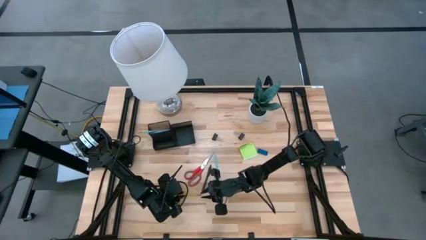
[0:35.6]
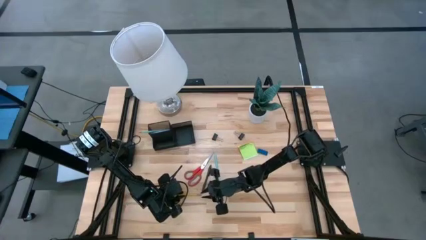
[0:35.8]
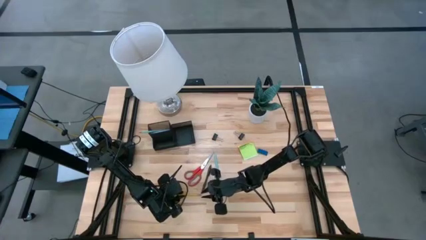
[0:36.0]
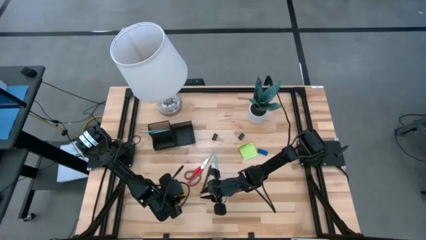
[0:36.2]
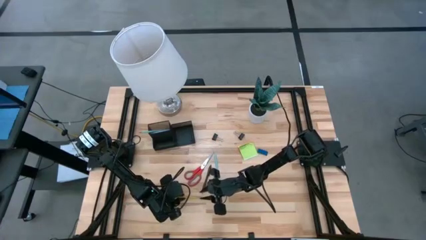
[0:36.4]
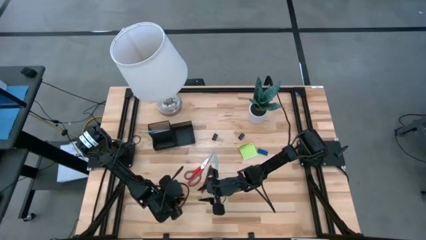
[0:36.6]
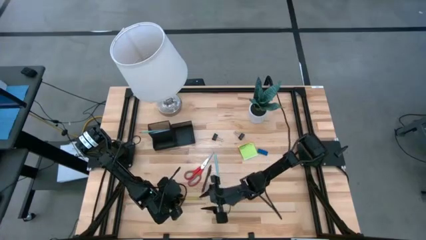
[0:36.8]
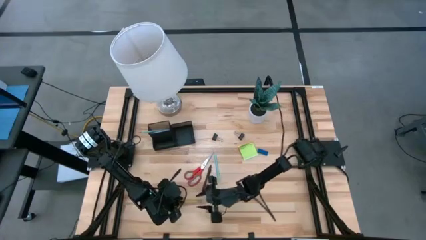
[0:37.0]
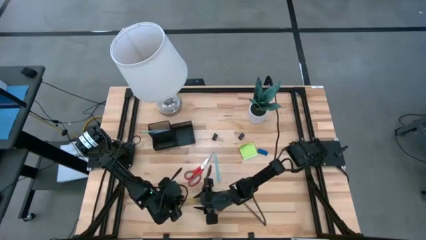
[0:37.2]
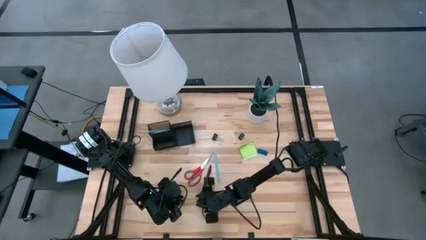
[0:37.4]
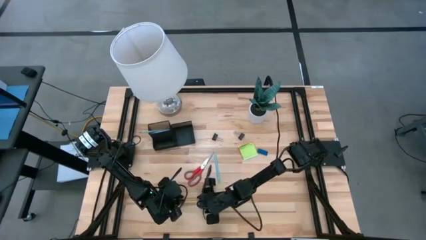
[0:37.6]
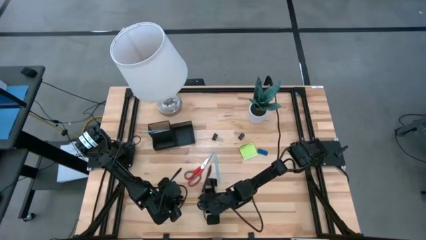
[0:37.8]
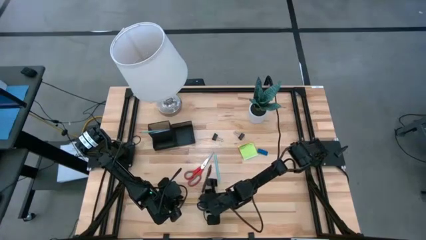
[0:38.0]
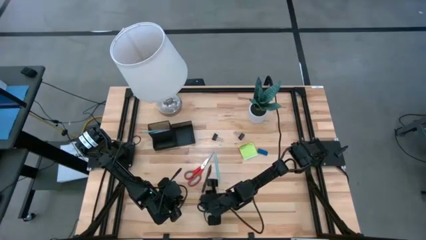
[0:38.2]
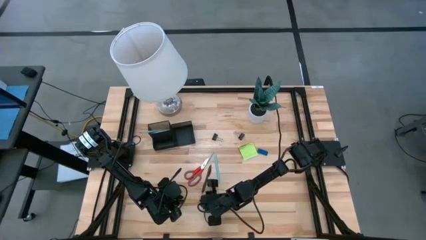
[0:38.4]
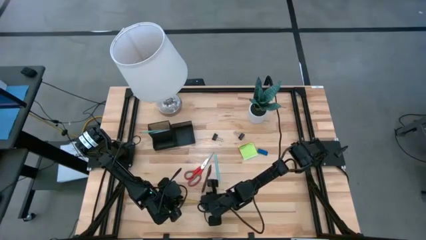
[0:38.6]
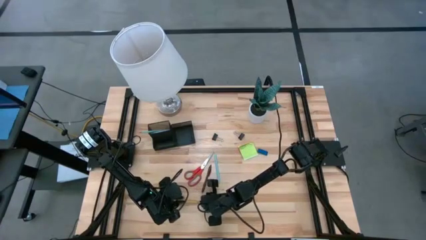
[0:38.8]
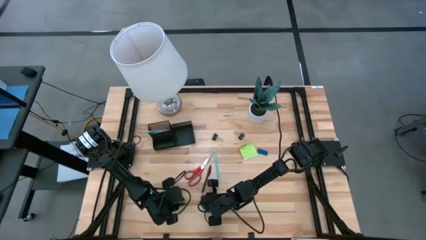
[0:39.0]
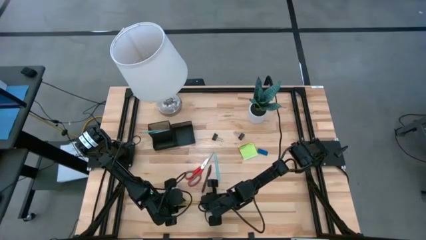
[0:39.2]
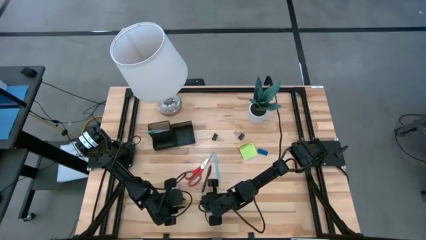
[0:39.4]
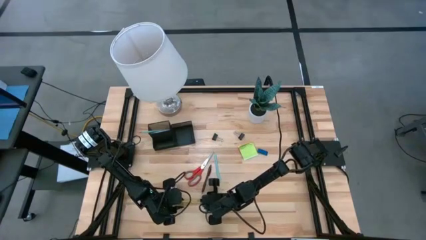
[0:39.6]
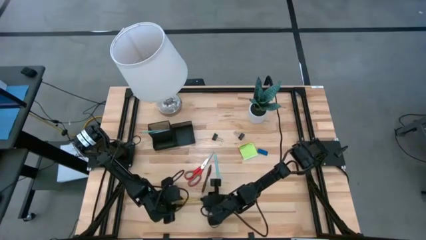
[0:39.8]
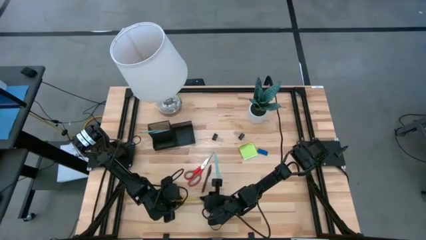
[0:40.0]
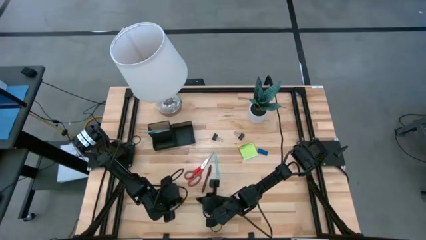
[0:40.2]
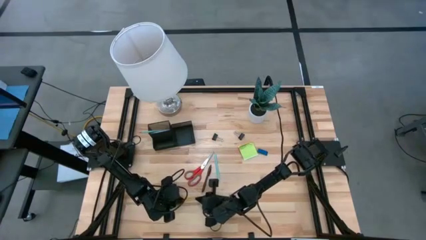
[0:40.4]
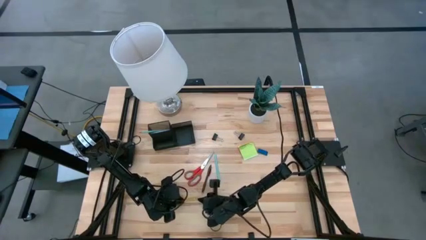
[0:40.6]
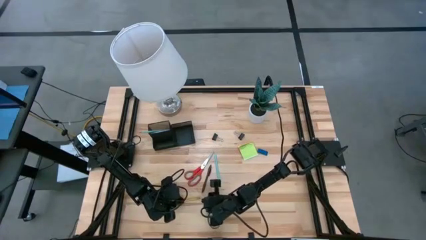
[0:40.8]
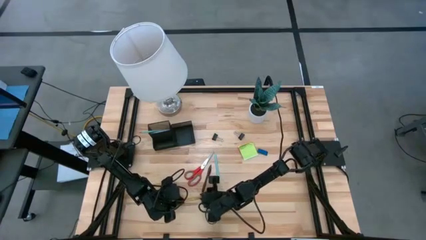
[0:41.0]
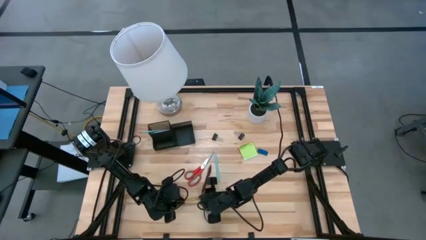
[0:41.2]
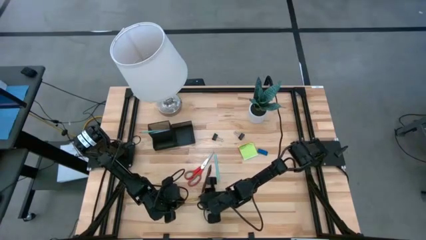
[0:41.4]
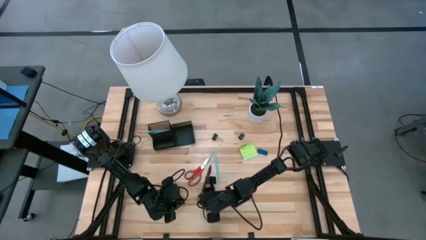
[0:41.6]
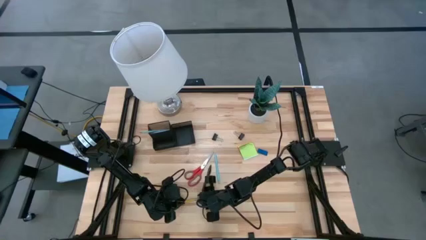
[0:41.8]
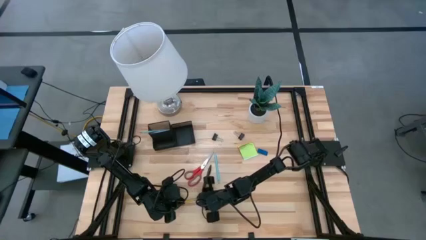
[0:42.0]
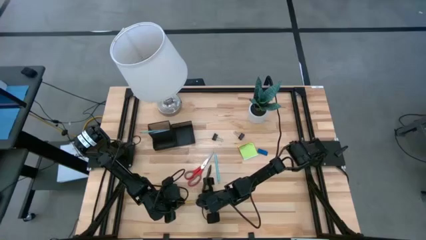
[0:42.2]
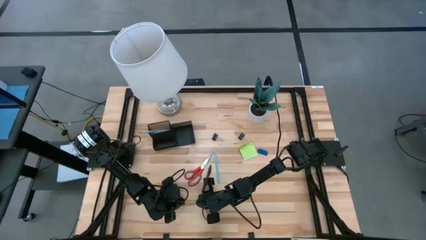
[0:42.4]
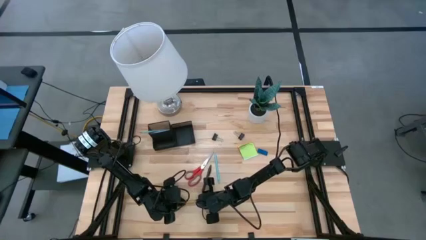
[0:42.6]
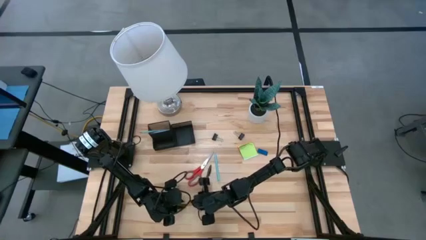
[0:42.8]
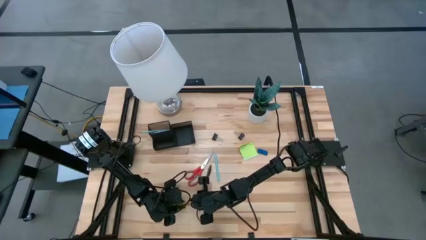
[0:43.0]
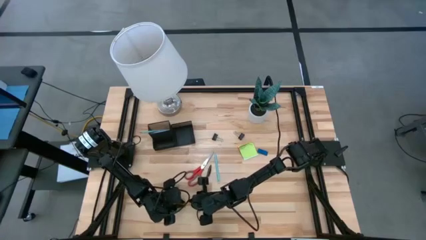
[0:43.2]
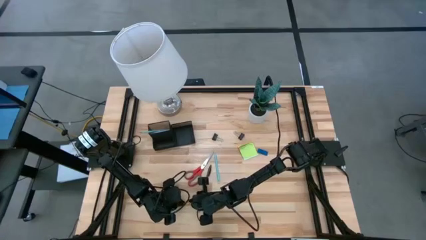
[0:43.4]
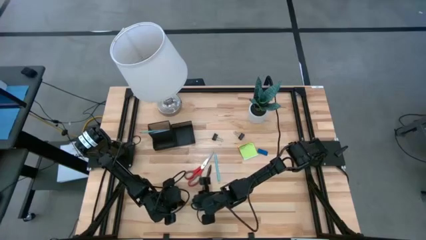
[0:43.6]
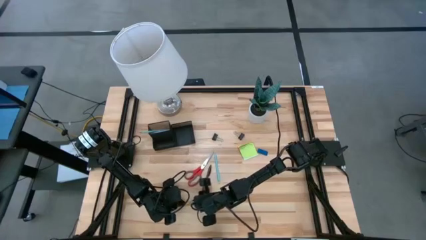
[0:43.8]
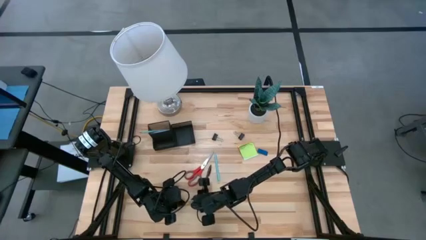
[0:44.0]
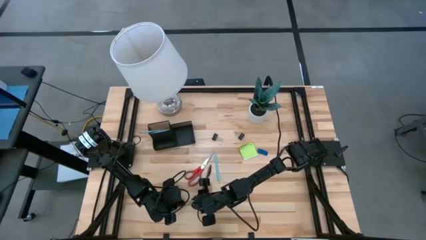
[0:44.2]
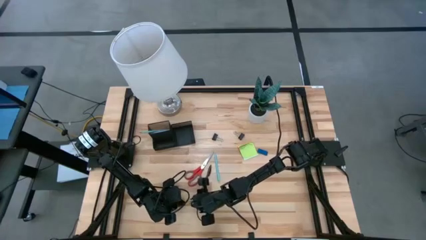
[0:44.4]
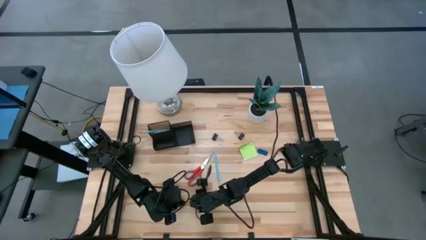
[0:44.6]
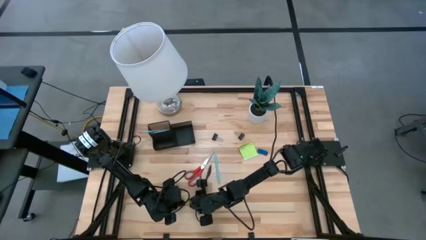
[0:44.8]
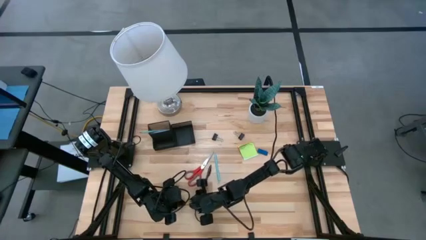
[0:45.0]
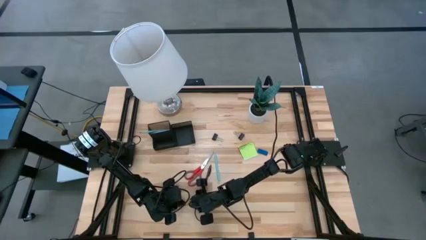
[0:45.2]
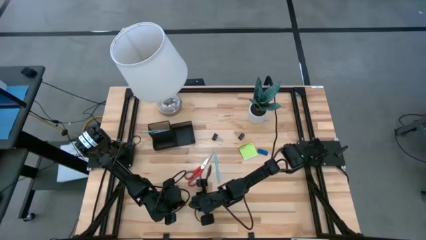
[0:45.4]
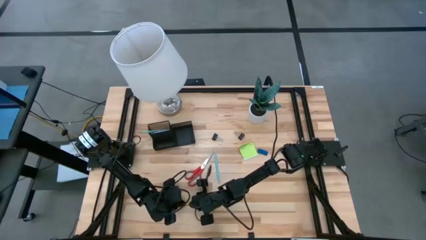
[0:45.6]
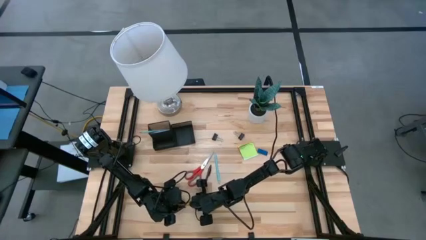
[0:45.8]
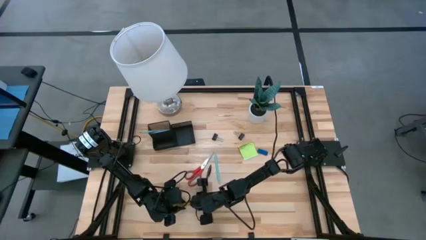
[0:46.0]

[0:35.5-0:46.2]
Task: Pick and place office supplies into organizer
Put the yellow pencil into the black desk organizer

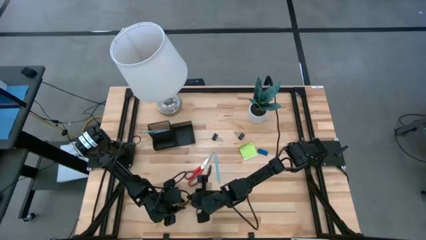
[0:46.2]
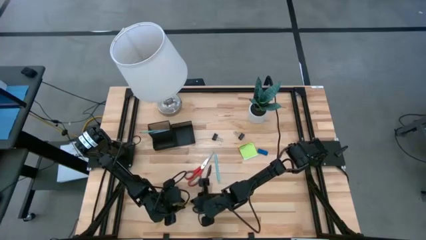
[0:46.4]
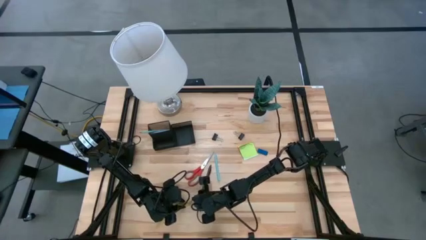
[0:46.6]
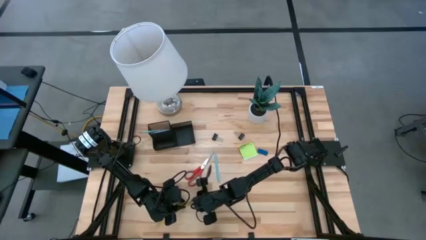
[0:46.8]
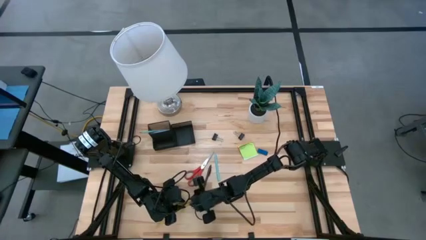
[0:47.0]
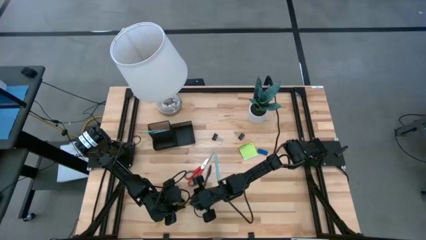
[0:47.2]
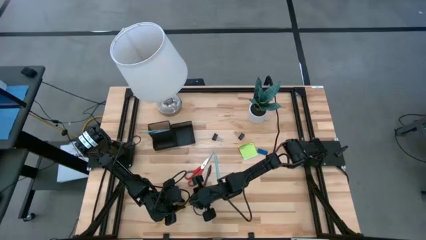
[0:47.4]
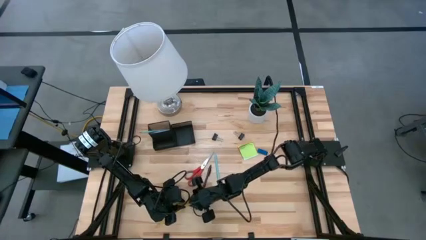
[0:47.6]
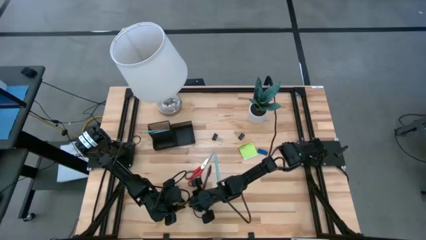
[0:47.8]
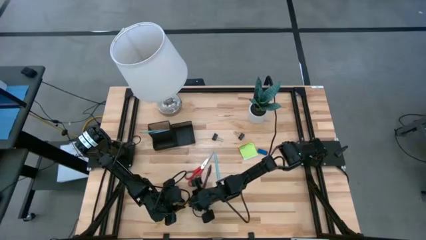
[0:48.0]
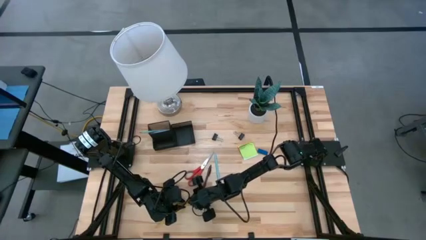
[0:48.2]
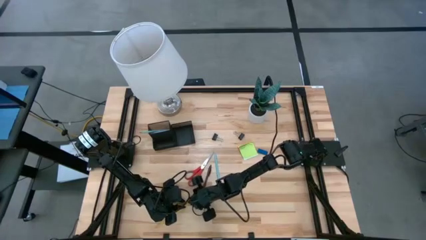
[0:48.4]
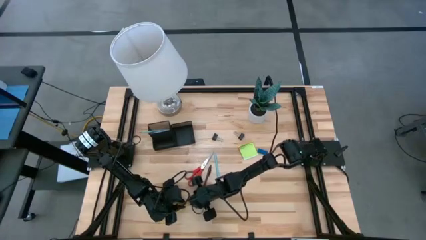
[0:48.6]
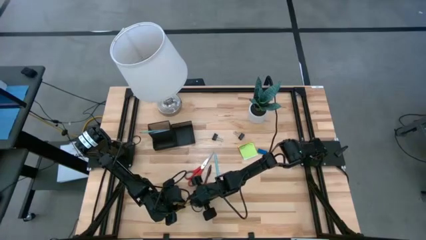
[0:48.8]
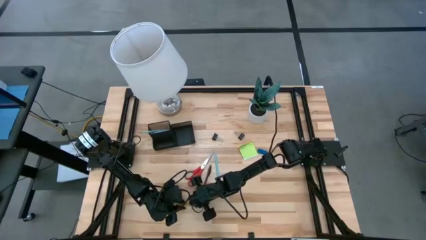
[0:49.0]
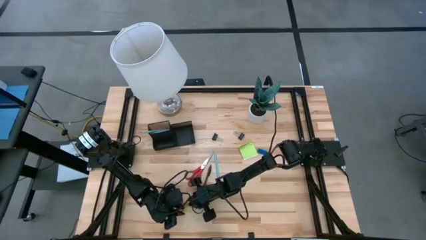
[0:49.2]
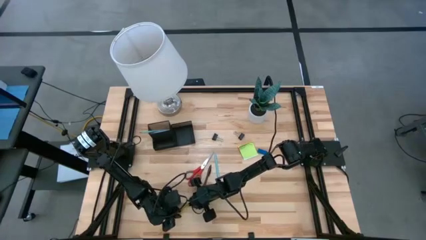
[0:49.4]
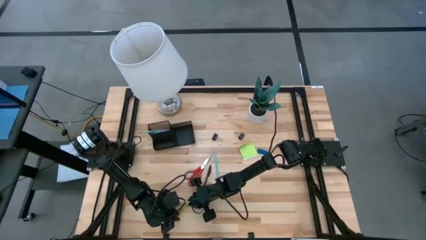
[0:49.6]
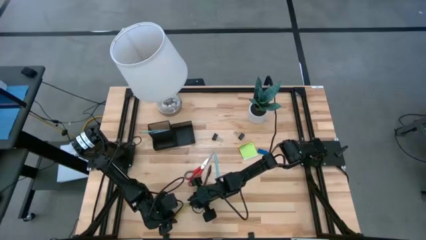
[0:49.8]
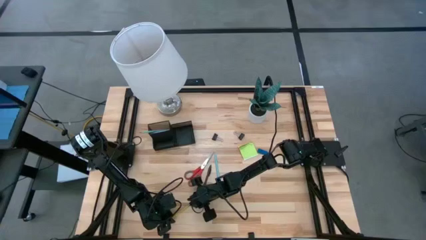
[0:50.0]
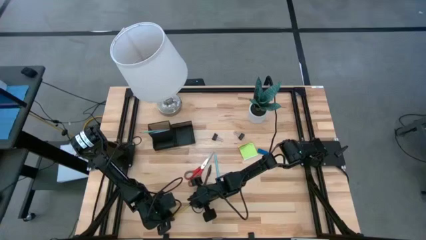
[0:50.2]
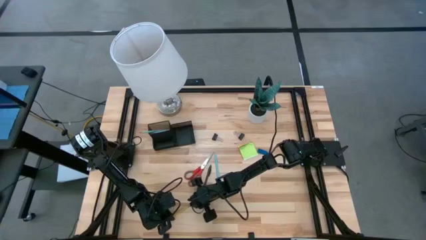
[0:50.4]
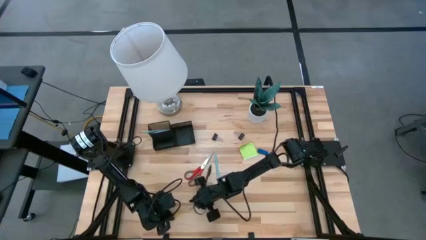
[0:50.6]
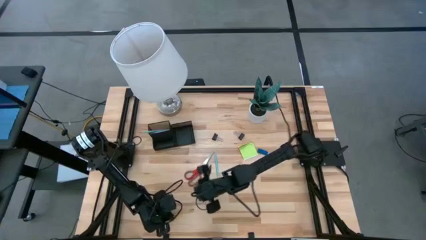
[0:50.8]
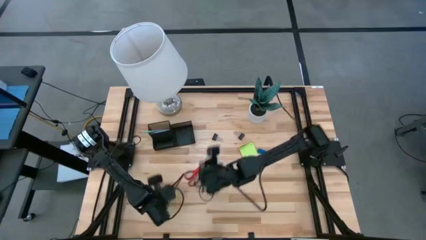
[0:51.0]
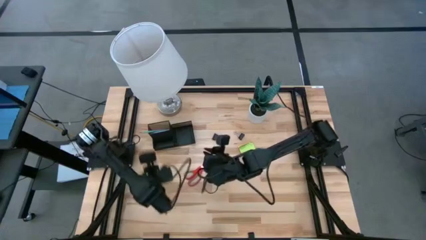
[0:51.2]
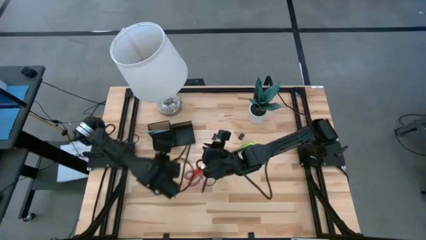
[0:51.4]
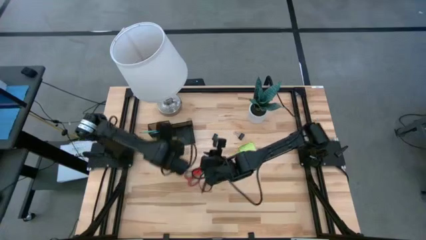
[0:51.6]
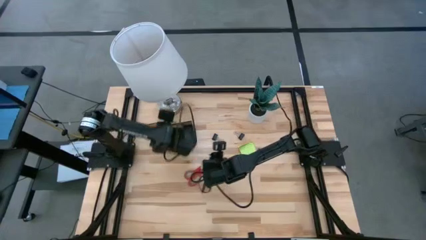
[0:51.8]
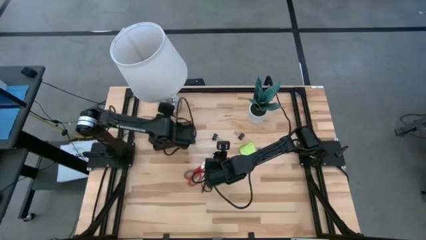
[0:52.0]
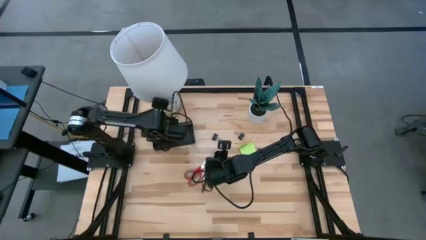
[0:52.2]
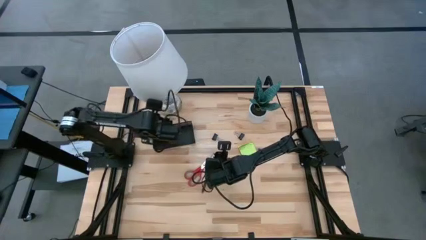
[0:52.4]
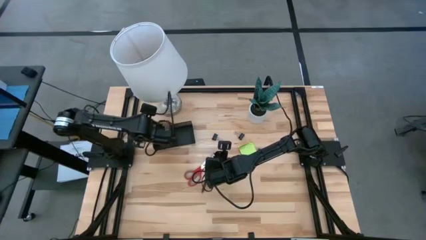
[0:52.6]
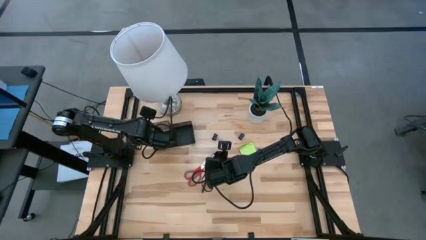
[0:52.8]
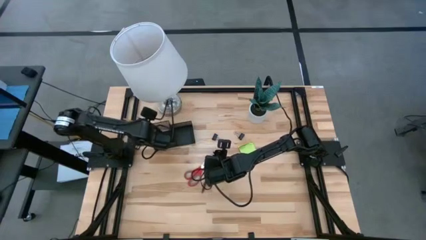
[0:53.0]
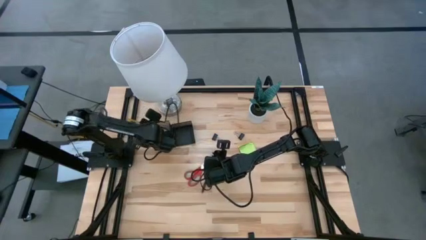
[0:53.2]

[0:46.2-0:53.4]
Put the yellow pencil into the black desk organizer
